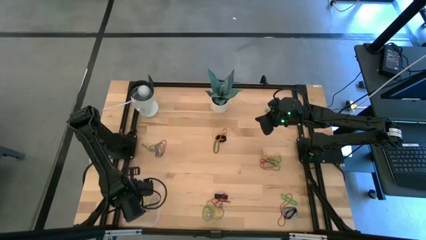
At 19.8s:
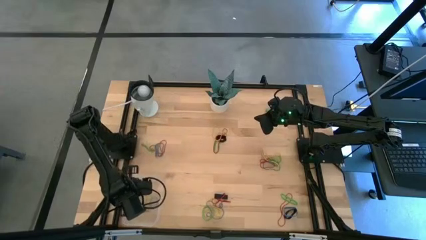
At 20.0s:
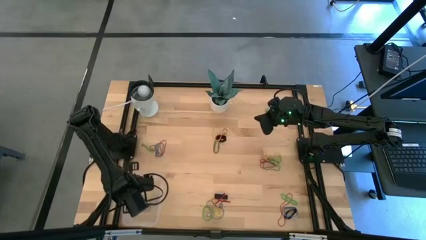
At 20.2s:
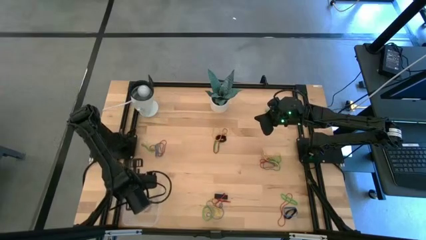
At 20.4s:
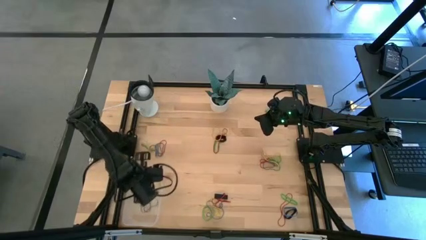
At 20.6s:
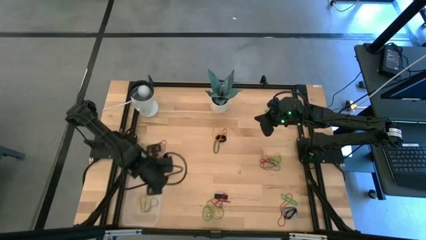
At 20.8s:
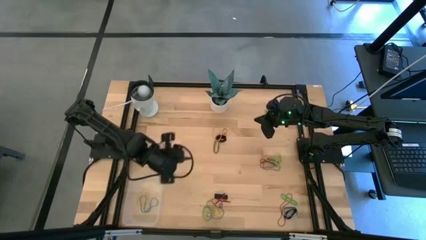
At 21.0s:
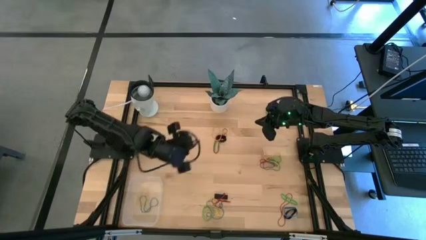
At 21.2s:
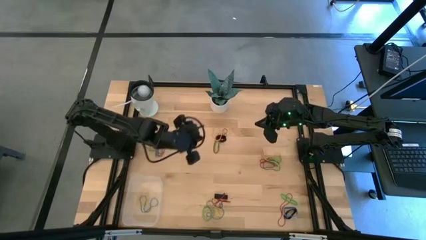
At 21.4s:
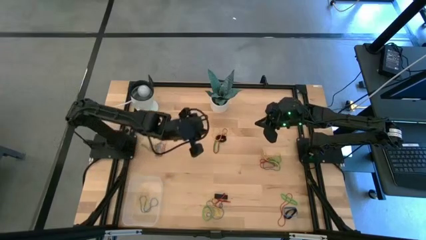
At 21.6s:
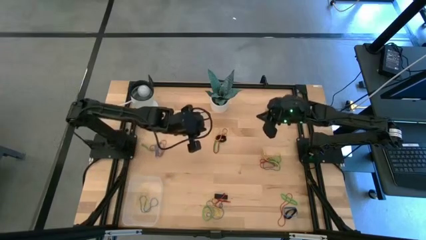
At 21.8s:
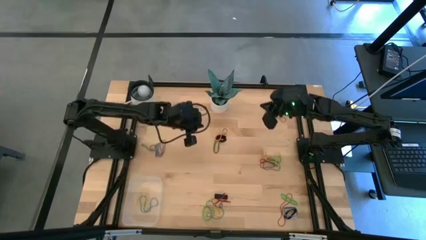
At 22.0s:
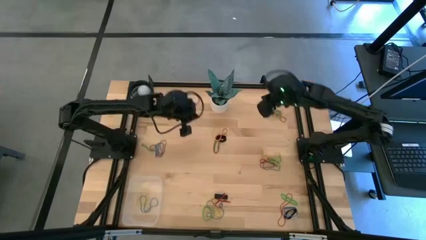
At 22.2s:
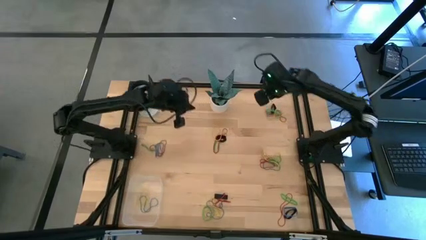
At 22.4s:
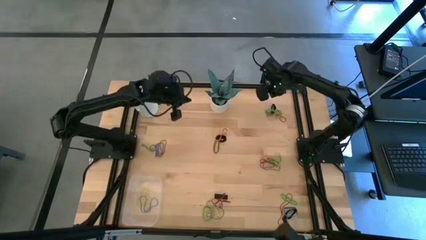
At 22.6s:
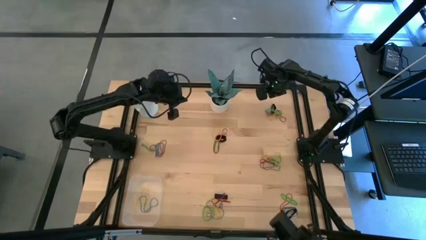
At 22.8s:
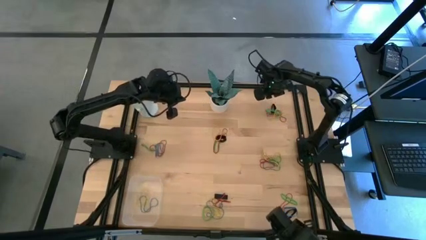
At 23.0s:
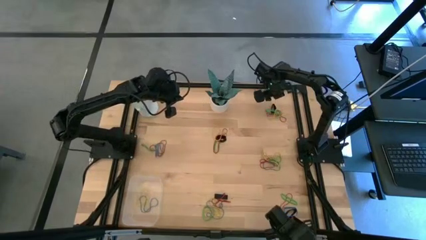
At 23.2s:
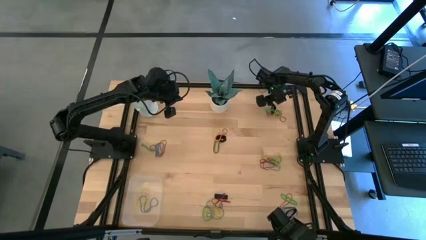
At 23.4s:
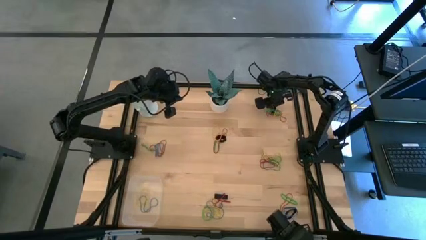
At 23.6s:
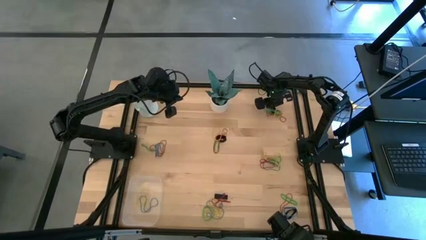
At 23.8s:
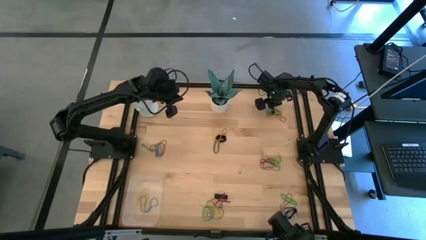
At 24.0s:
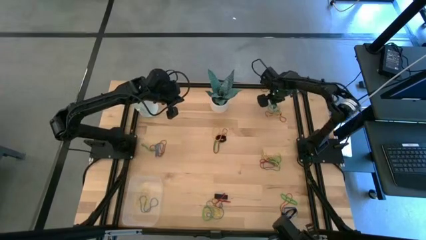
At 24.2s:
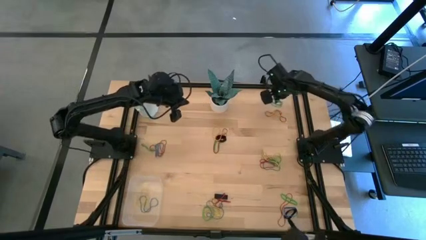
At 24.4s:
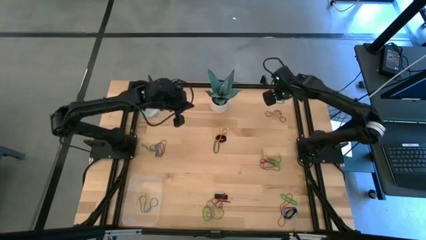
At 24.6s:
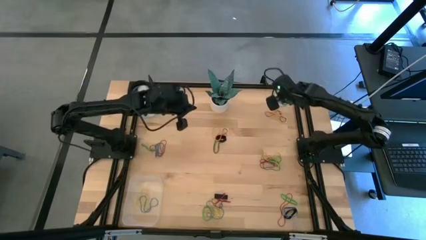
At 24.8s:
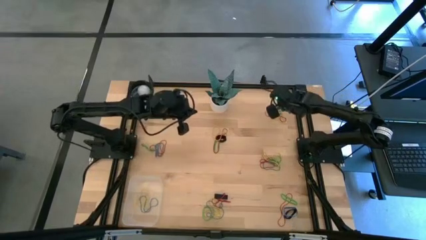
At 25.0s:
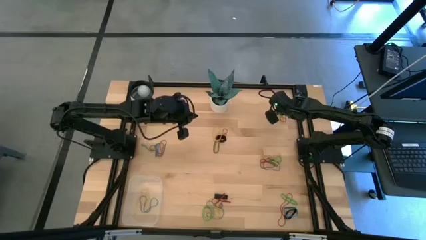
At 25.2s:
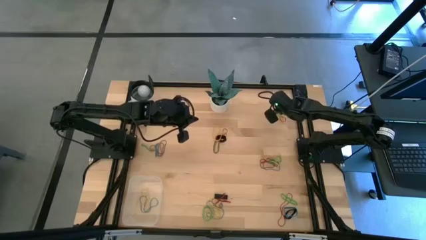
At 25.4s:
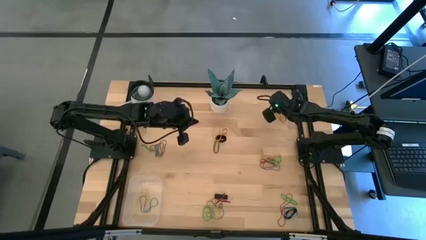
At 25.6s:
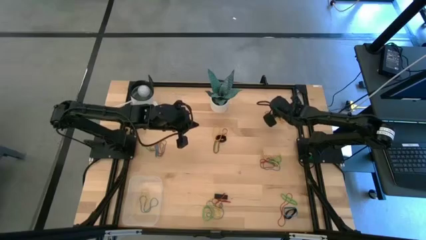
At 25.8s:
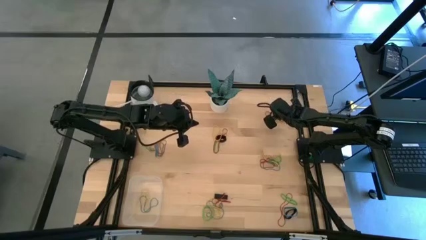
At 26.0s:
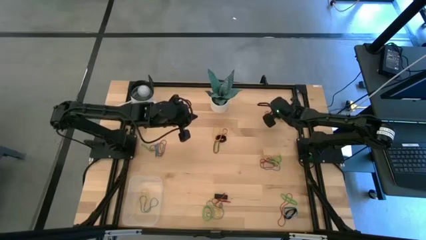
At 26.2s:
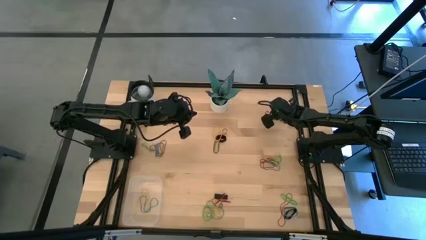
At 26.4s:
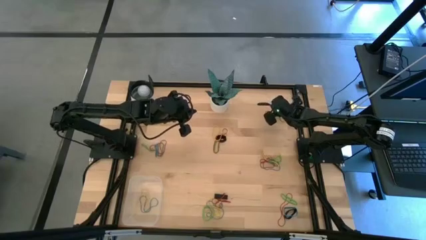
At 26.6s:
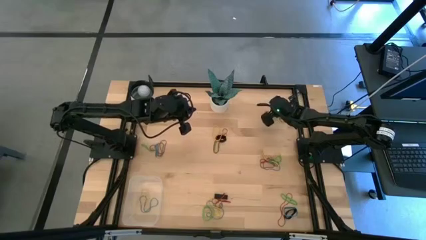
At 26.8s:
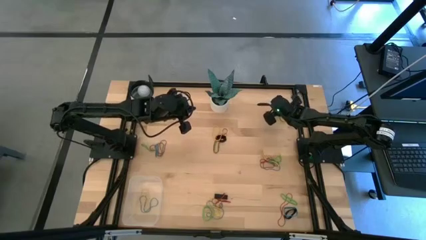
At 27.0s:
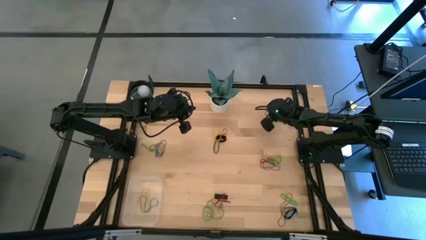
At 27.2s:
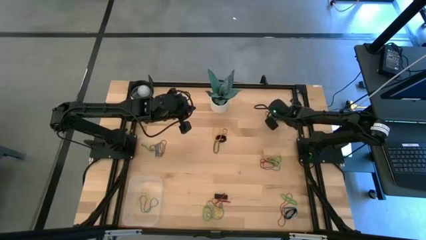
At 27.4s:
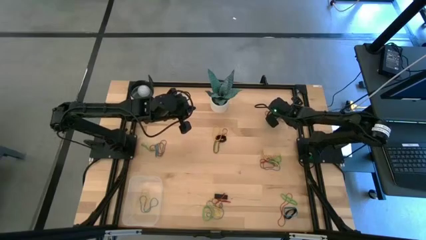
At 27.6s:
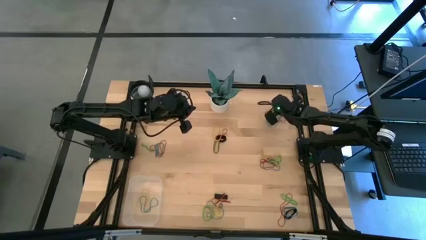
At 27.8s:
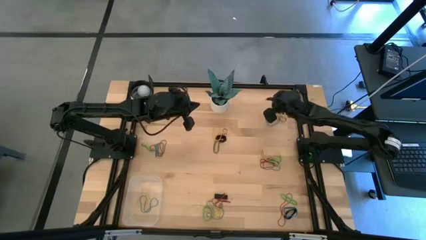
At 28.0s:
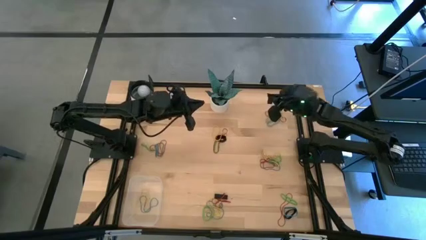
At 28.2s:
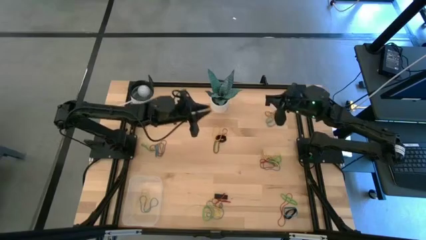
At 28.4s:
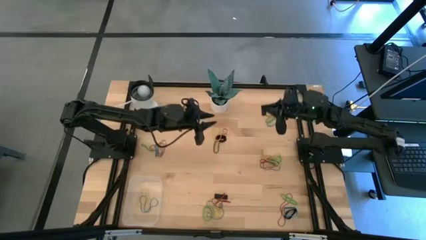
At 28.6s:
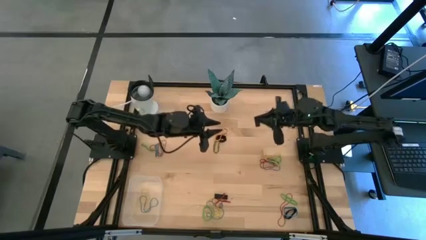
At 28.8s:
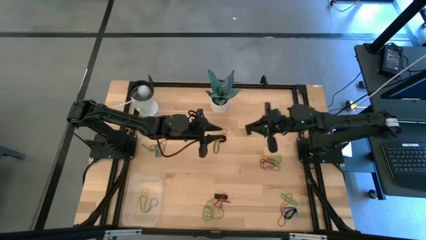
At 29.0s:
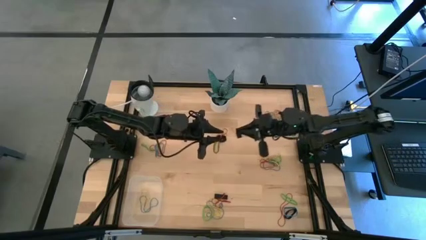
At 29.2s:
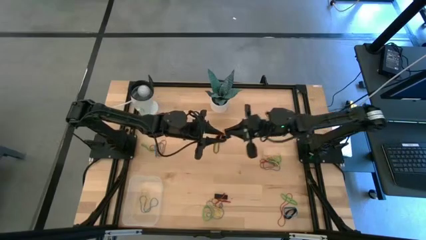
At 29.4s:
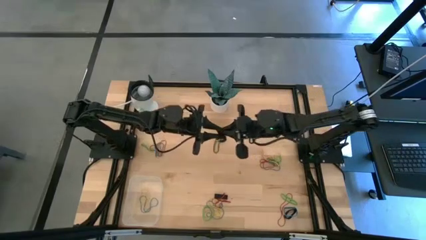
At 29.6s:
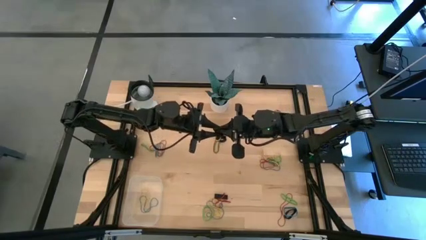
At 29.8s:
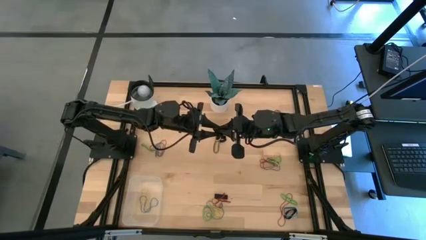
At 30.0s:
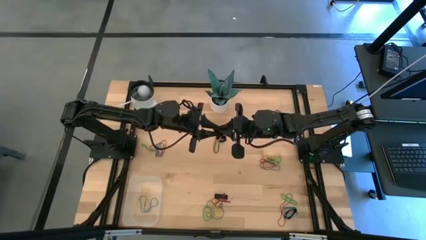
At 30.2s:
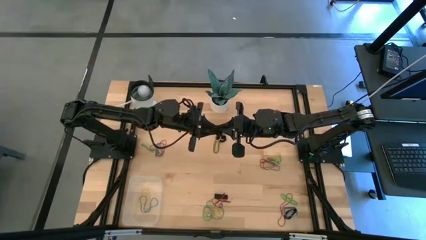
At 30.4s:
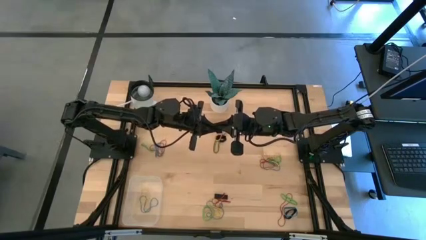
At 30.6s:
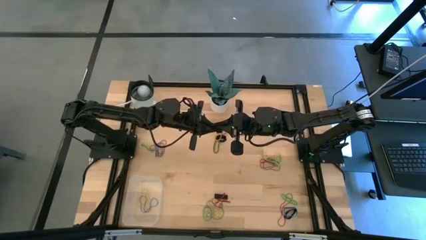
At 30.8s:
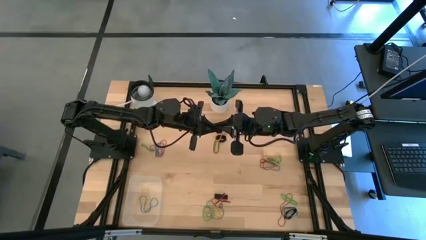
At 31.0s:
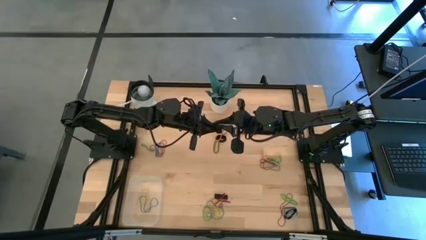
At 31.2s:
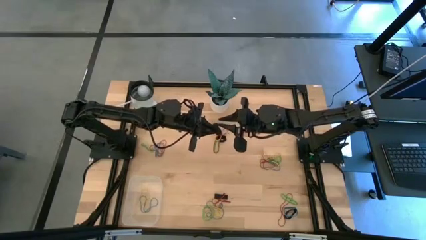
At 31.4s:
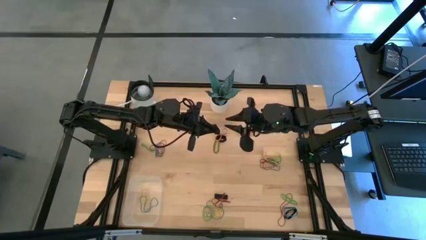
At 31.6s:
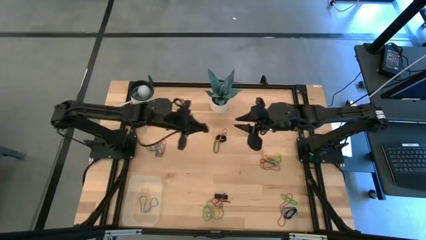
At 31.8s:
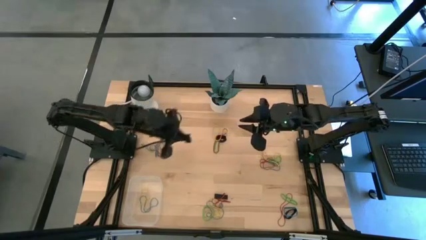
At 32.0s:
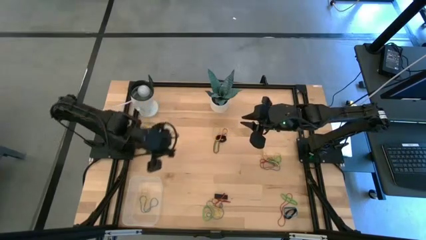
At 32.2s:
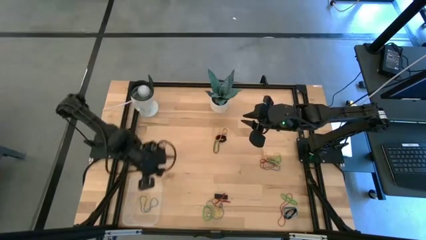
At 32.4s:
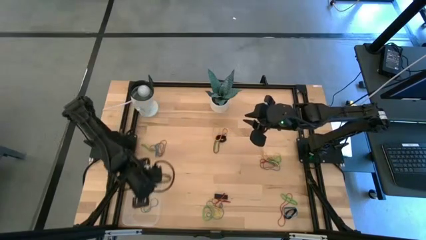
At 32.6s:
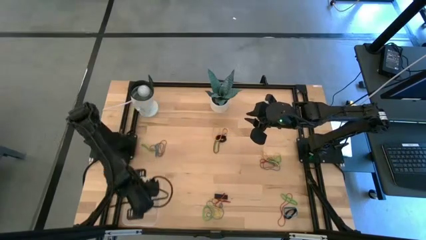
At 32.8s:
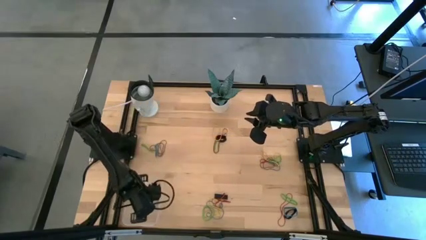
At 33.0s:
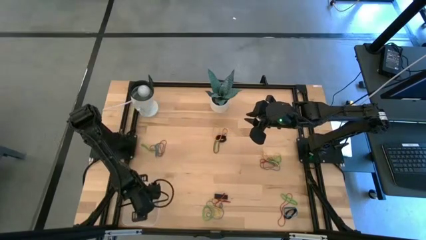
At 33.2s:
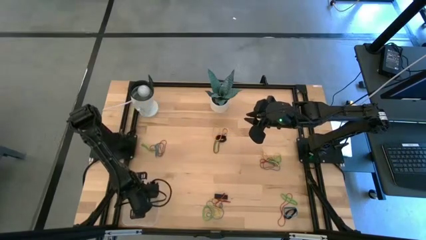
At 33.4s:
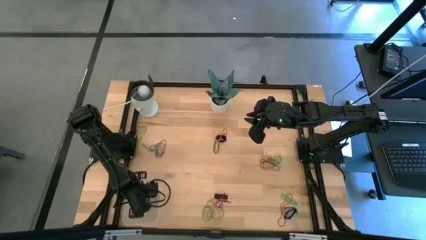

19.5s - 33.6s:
Task: Pick and place rubber bands into bin
Put the black rubber band into the transparent bin

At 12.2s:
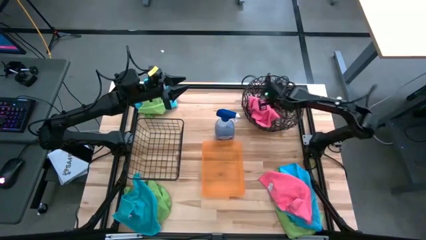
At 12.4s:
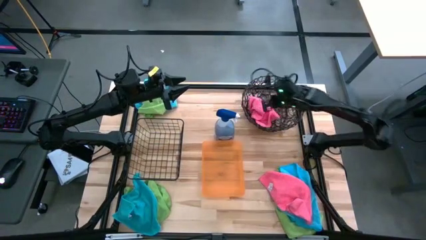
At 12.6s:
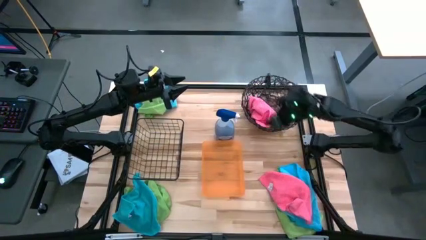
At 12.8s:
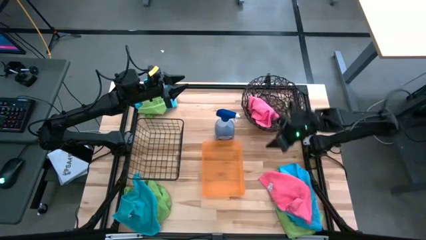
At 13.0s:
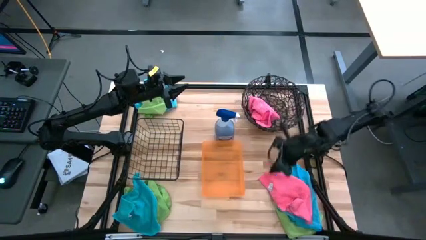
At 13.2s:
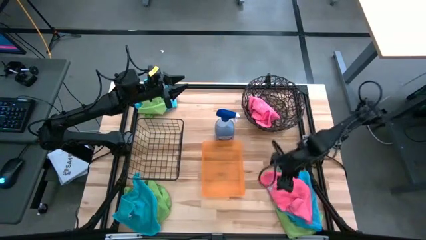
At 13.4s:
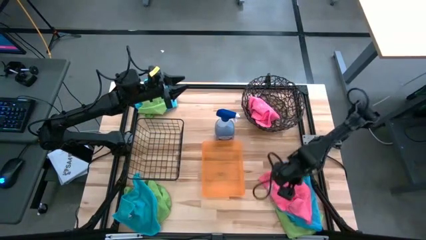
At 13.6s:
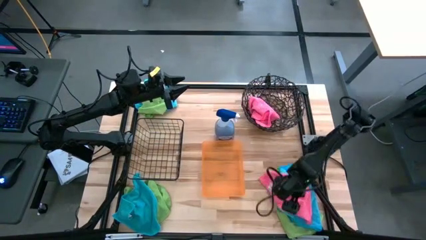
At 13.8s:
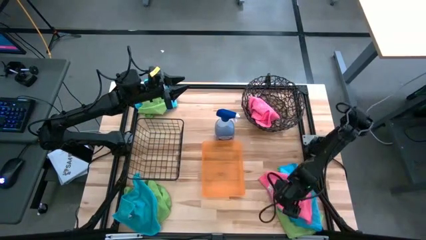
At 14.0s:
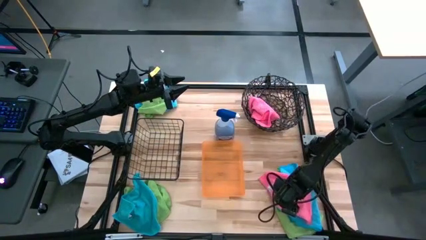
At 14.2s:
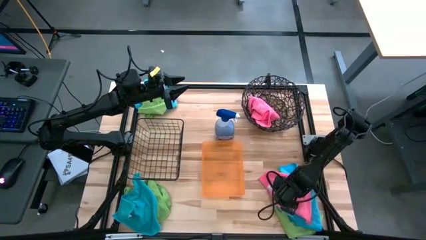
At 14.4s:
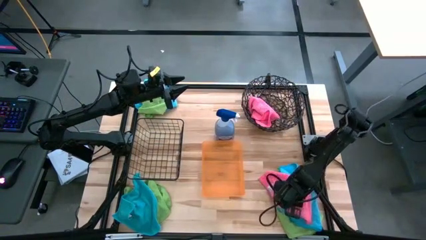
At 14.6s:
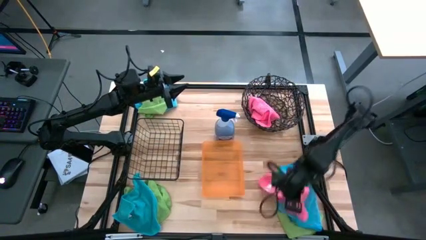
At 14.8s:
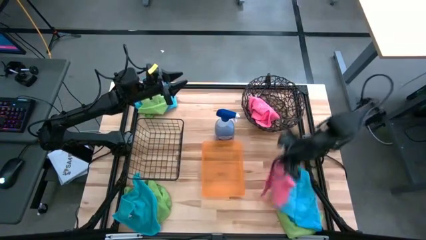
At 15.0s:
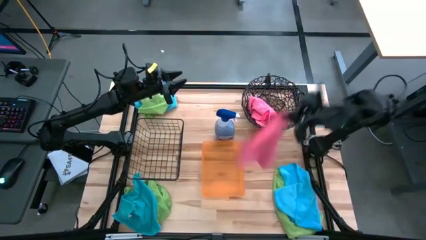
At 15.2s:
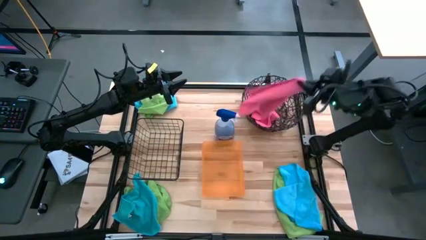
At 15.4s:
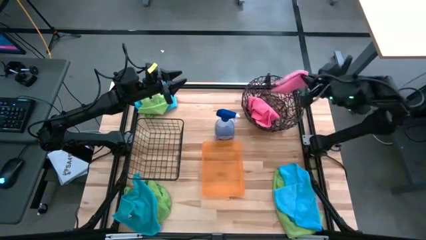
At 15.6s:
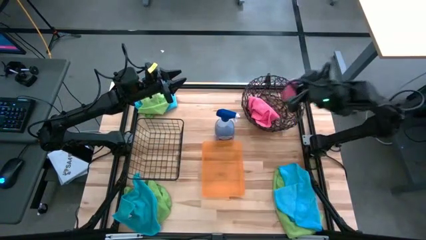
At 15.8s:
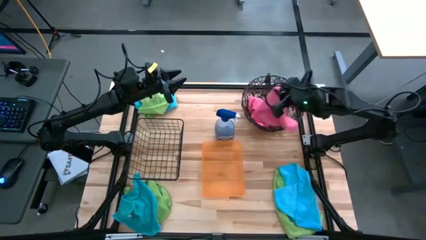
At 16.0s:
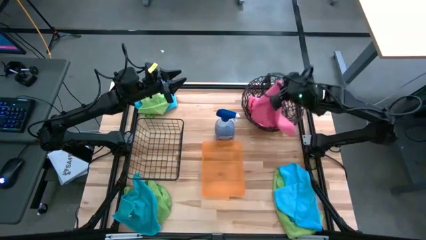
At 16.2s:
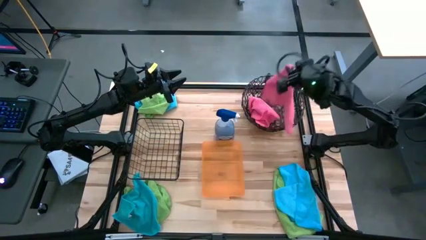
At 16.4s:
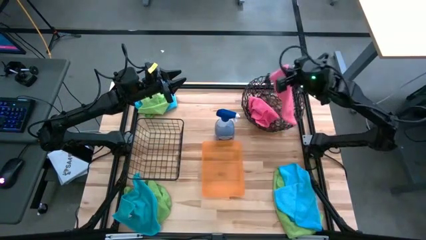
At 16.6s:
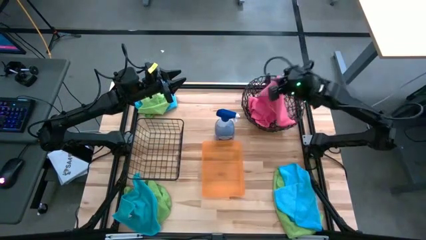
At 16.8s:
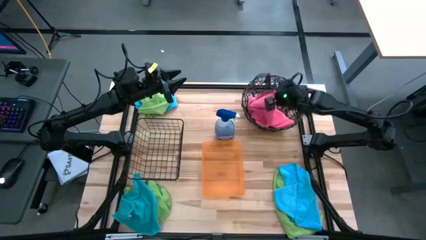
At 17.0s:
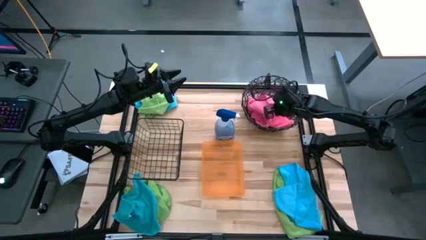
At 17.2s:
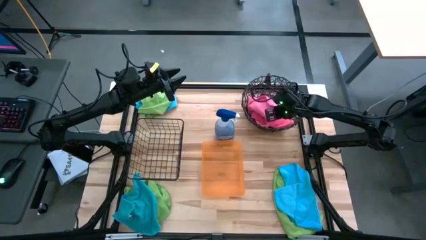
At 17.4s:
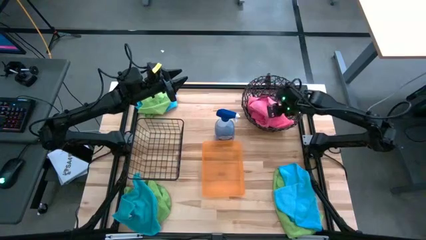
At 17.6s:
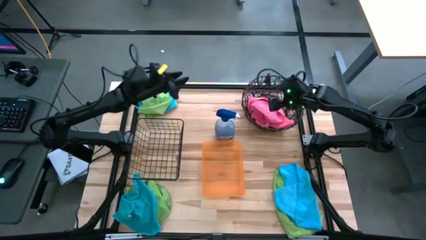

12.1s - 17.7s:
Task: Sort microfiber towel by color & place in baskets
Put the pink microfiber cloth into the mesh basket
